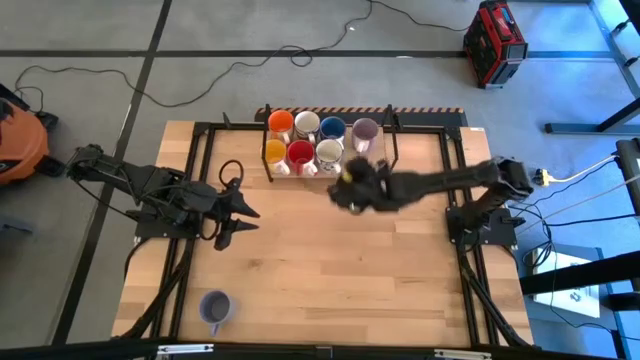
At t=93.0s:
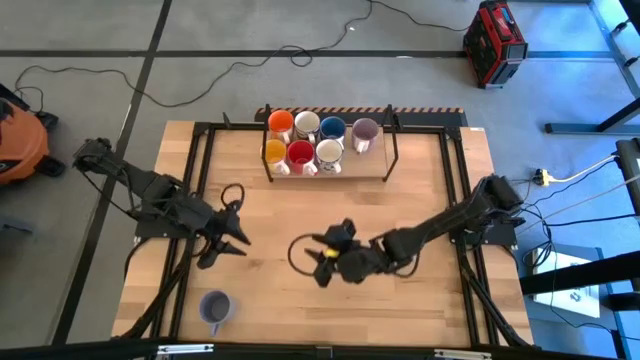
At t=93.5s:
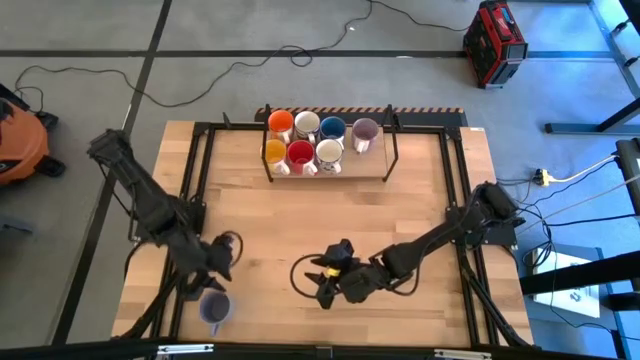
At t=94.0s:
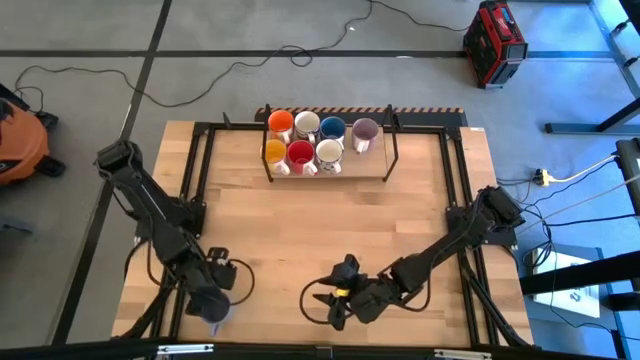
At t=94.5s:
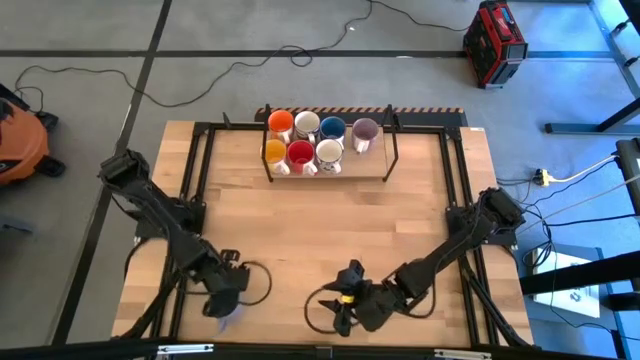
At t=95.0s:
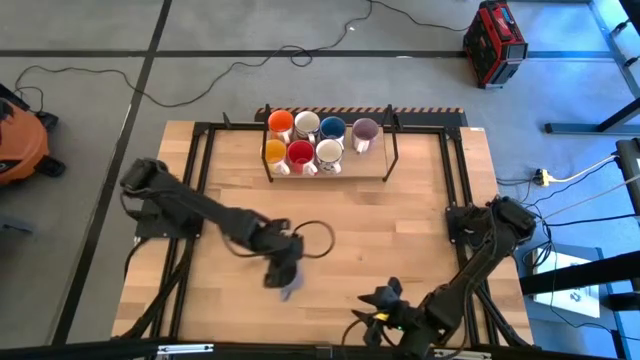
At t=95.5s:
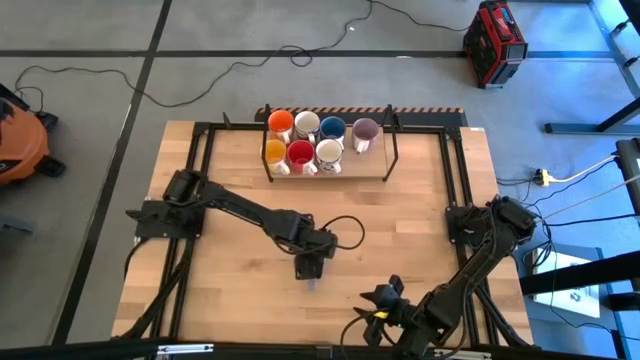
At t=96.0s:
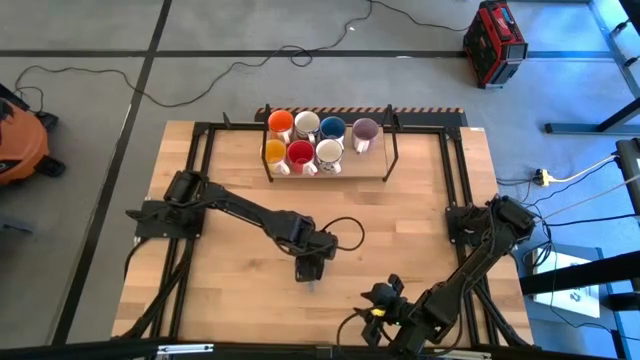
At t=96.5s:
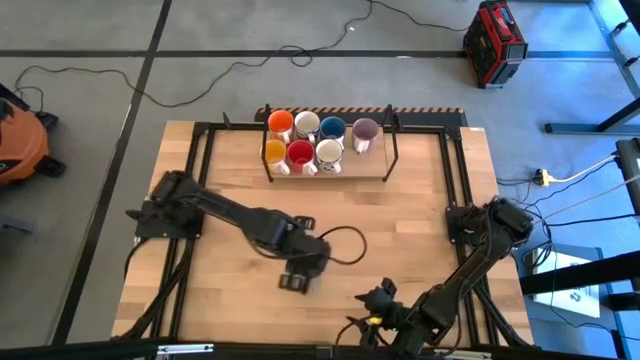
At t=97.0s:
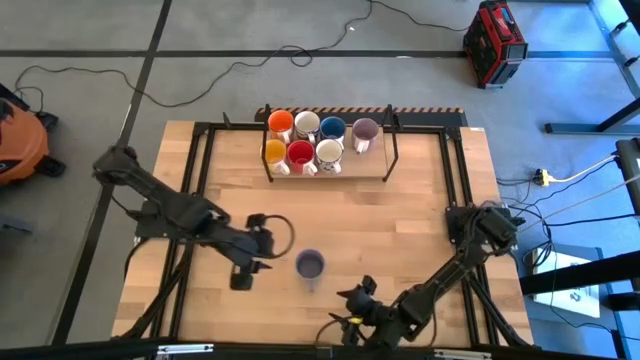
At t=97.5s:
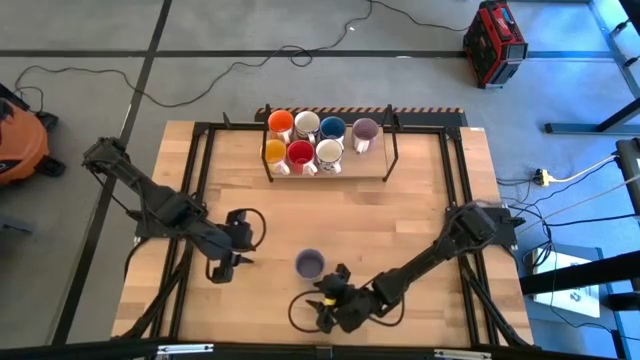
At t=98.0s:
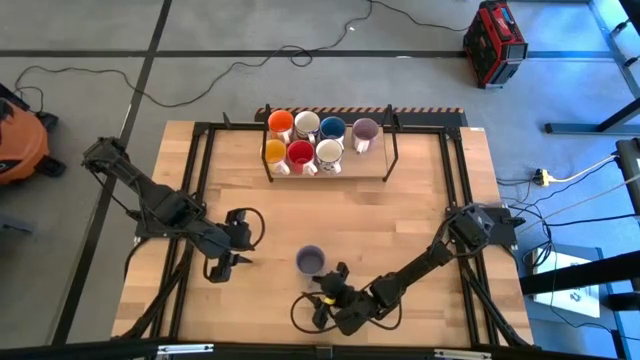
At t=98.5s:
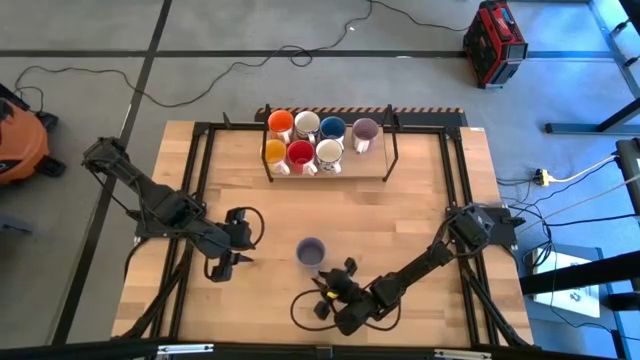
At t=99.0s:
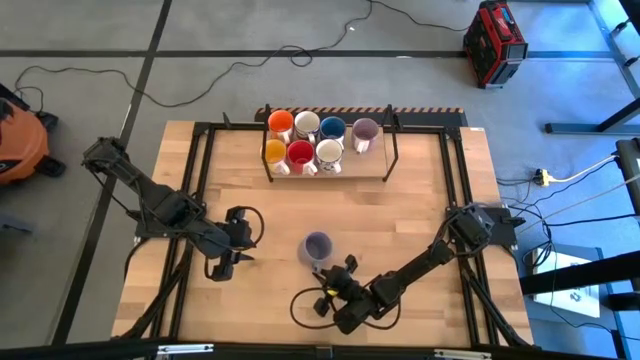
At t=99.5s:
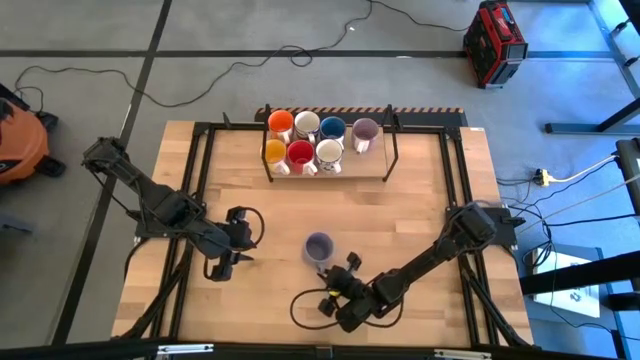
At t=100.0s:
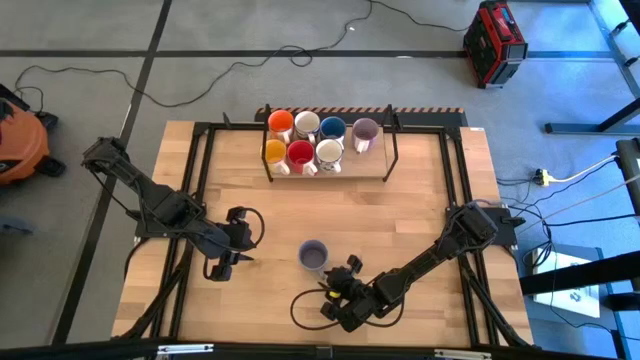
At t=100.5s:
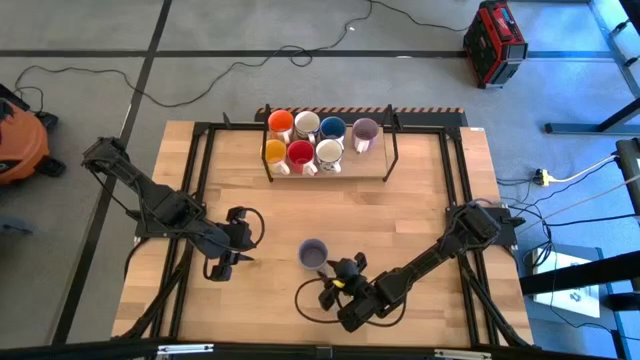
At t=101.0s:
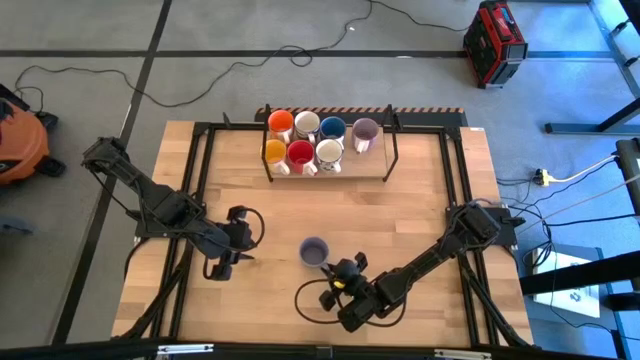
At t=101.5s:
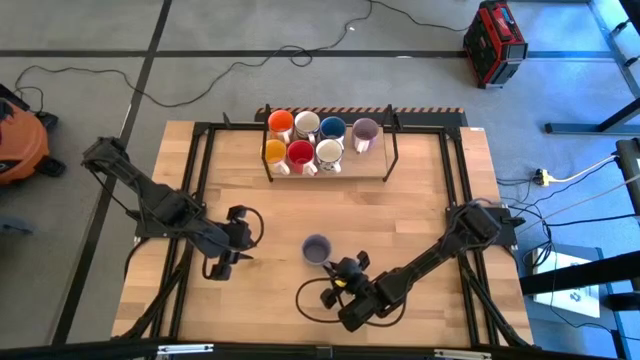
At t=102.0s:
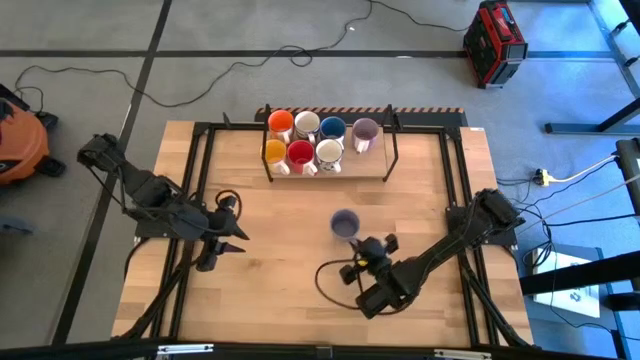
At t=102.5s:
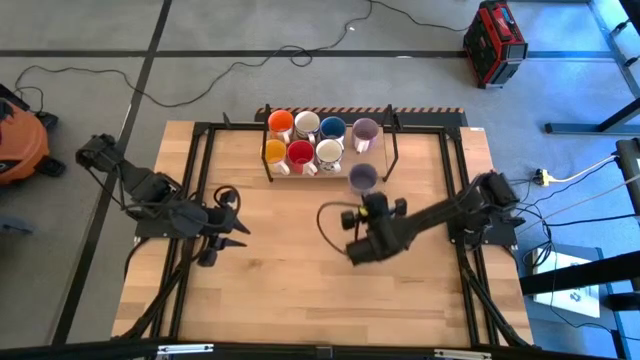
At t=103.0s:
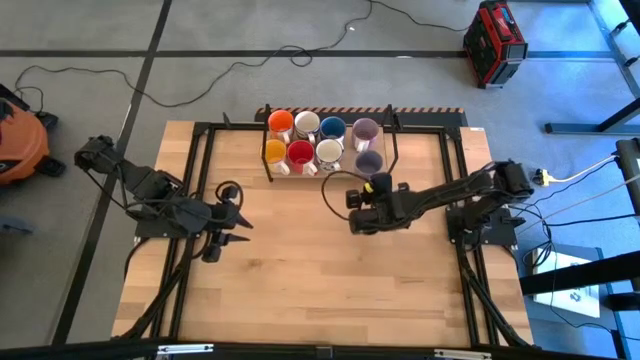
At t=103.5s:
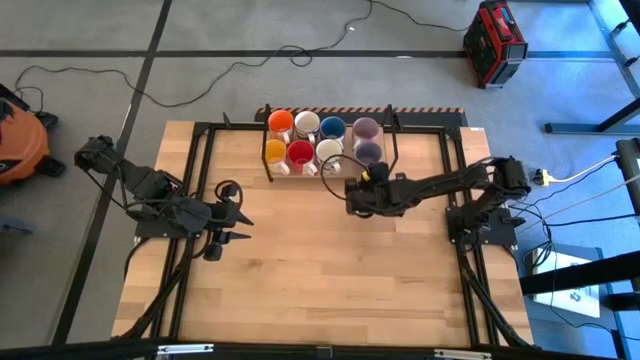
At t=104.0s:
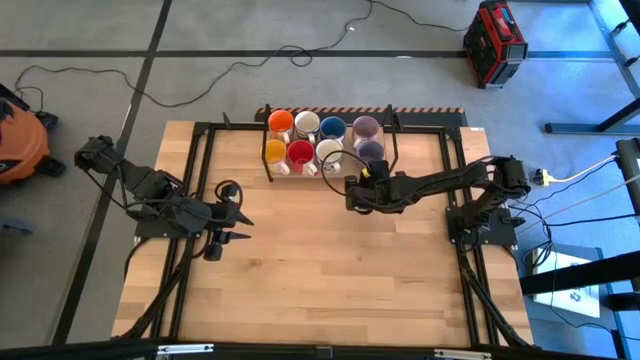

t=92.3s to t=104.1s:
Task: Place coffee mugs
Put the light purple mug on the shelf aligned with the purple mug

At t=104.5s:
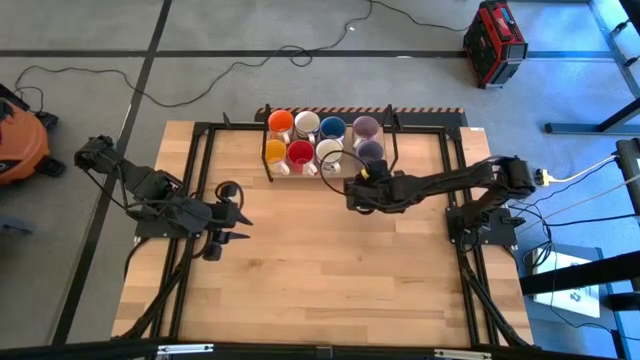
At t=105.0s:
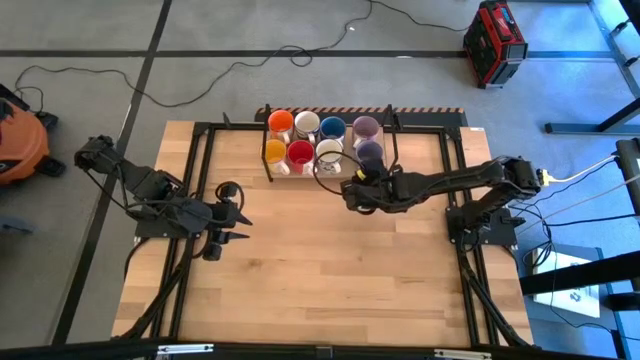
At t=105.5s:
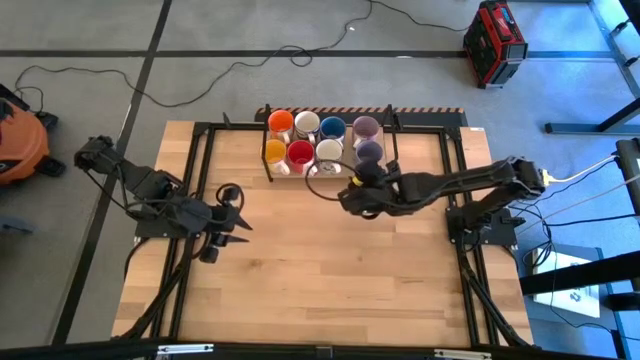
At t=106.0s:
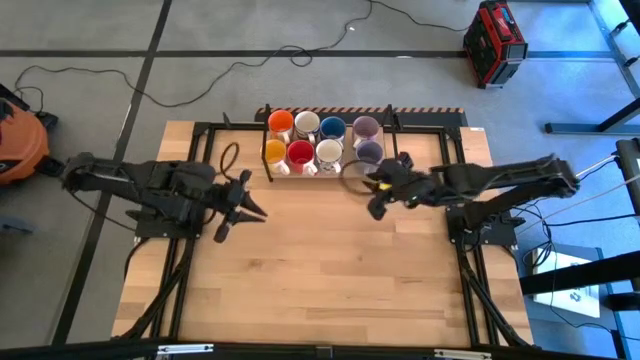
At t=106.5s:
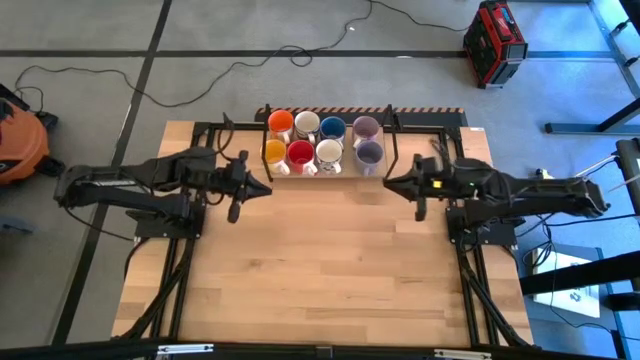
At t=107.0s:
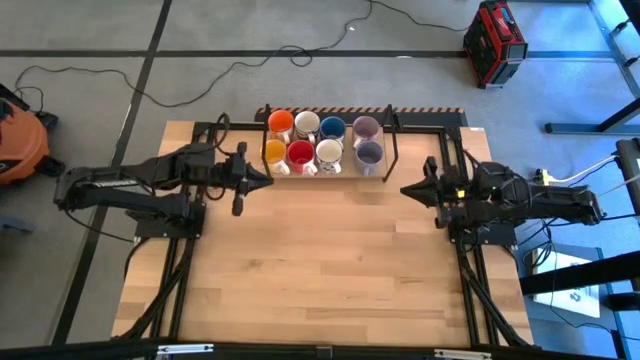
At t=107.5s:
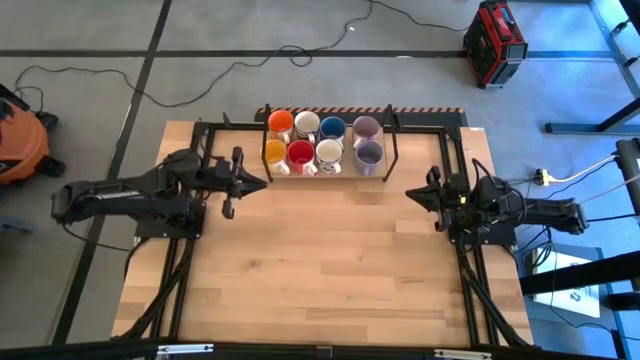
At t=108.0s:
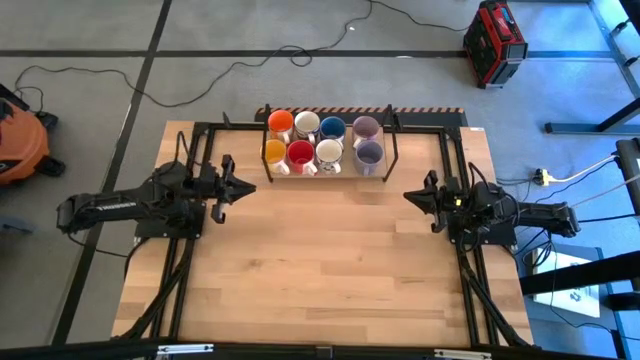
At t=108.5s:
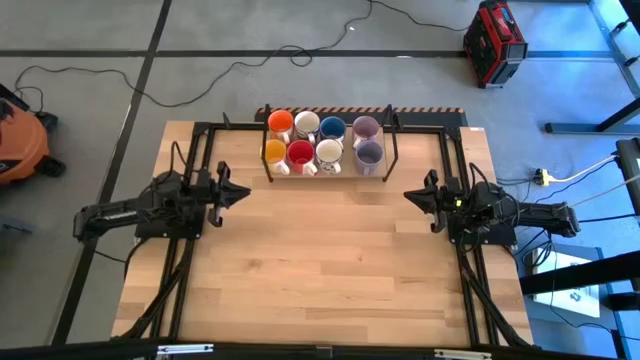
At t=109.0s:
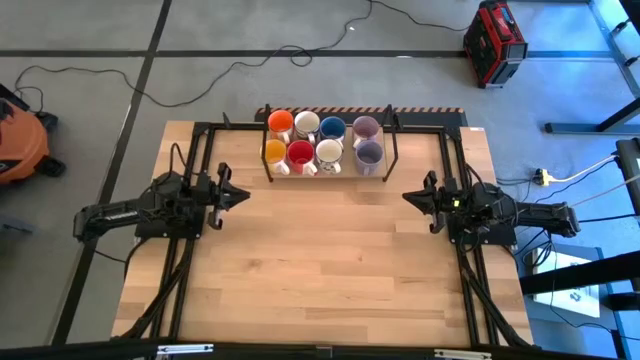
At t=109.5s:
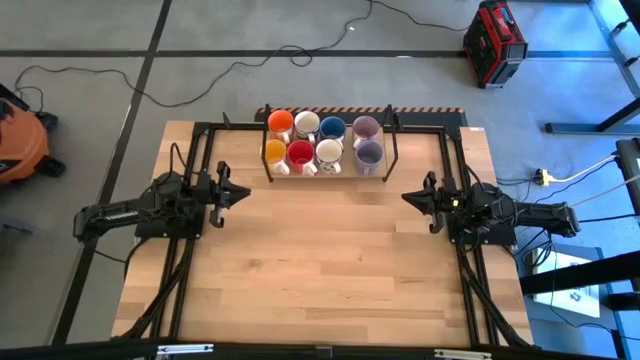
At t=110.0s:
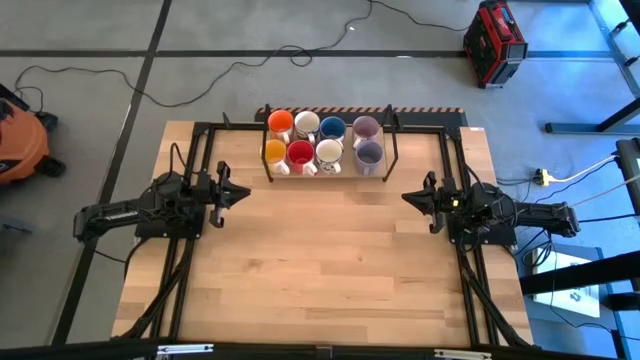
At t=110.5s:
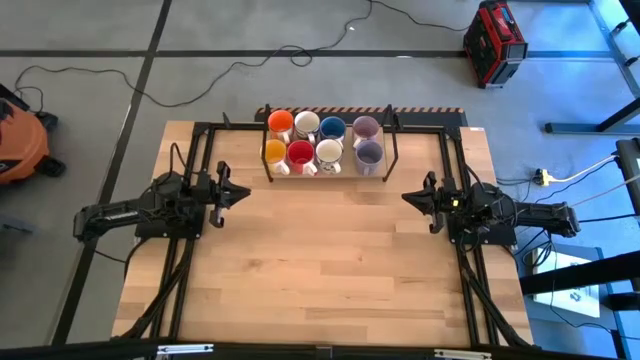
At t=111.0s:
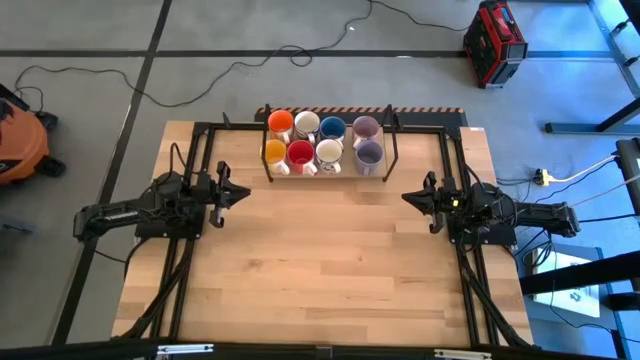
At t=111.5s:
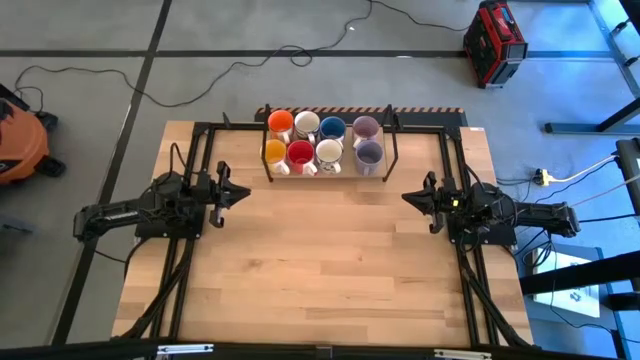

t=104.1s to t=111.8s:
Return to Home Position
